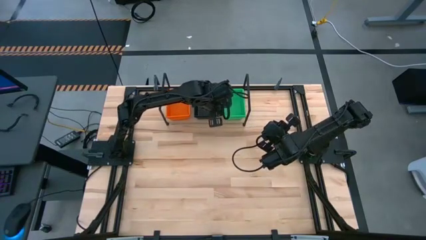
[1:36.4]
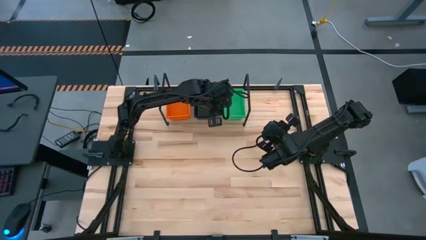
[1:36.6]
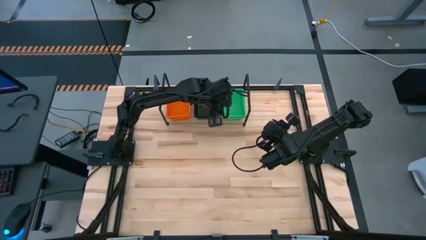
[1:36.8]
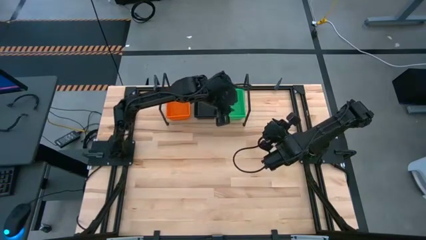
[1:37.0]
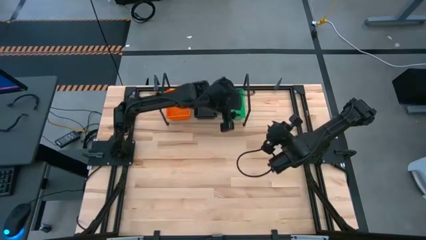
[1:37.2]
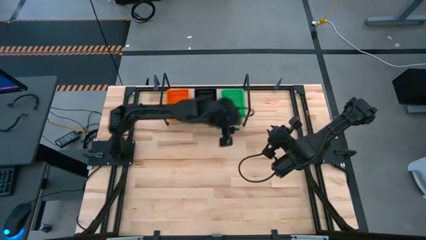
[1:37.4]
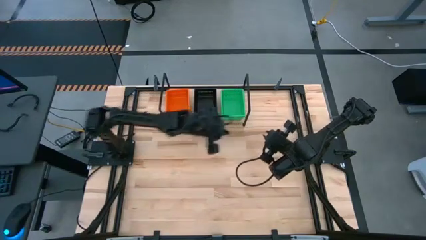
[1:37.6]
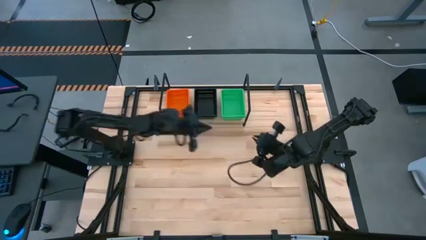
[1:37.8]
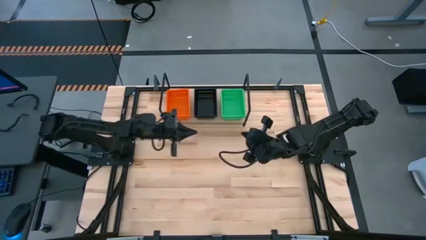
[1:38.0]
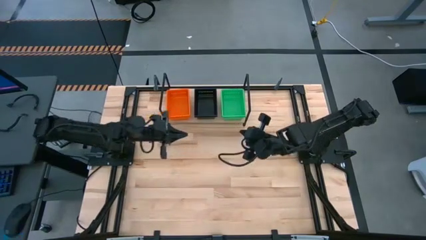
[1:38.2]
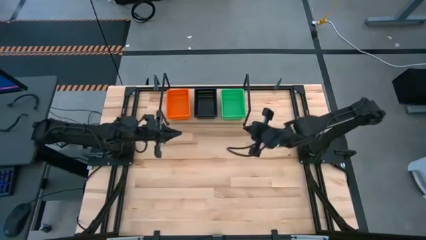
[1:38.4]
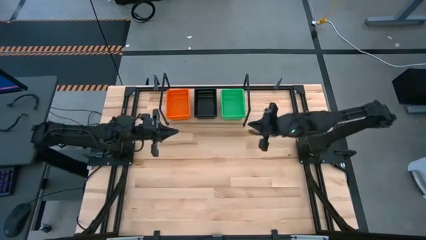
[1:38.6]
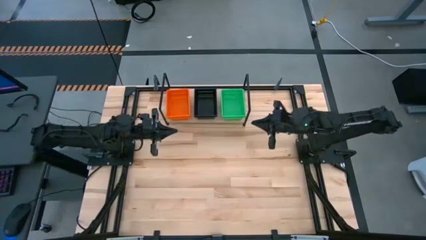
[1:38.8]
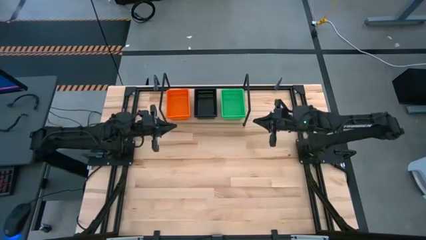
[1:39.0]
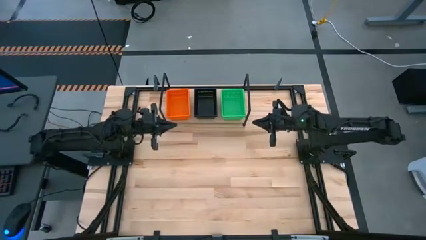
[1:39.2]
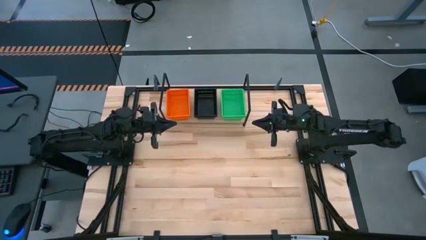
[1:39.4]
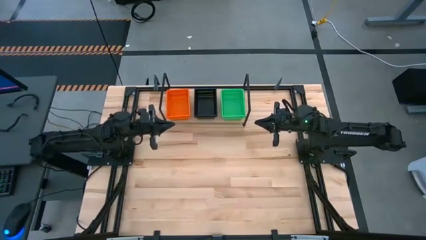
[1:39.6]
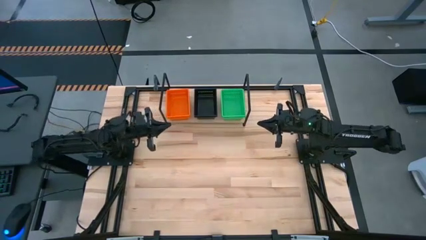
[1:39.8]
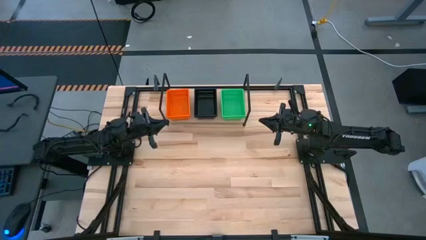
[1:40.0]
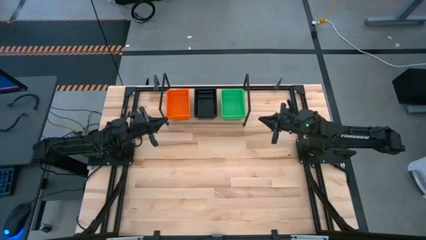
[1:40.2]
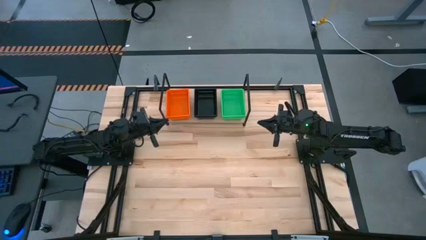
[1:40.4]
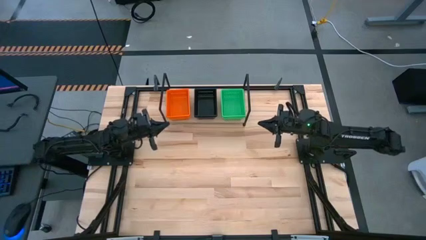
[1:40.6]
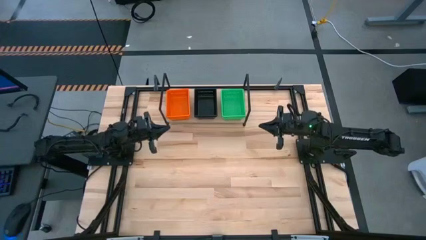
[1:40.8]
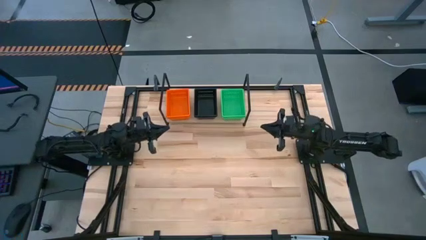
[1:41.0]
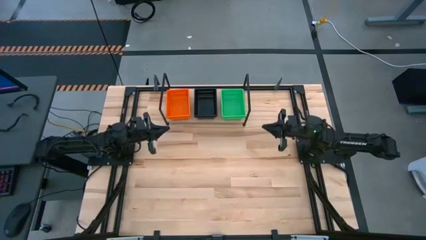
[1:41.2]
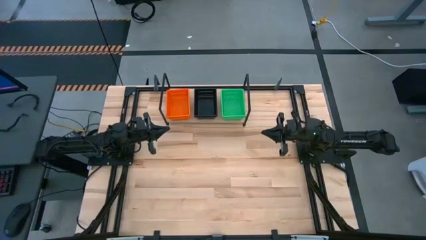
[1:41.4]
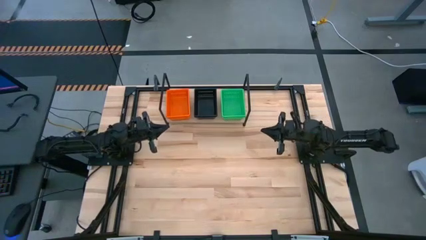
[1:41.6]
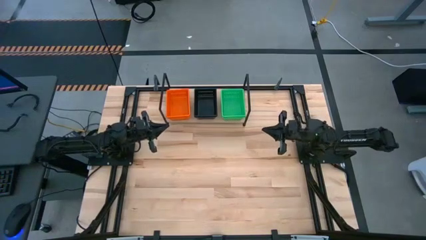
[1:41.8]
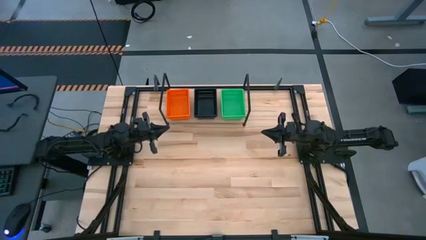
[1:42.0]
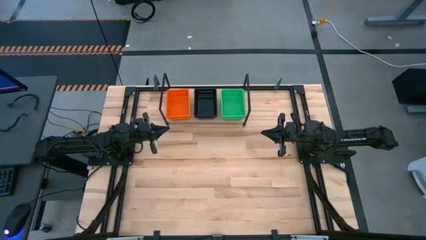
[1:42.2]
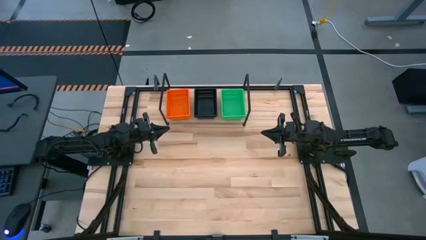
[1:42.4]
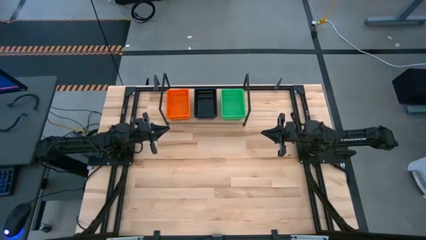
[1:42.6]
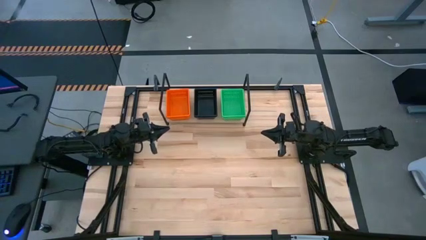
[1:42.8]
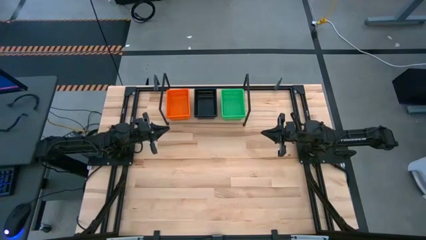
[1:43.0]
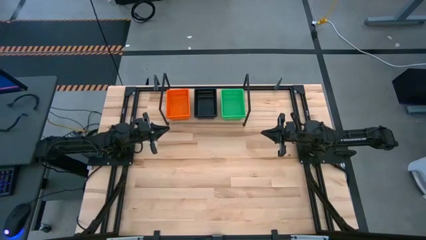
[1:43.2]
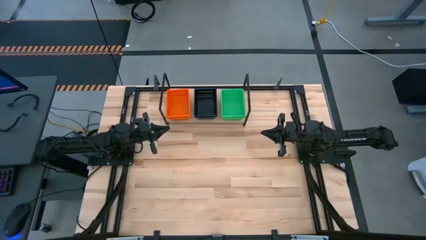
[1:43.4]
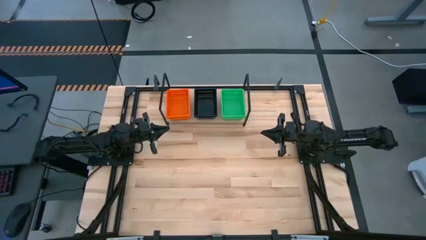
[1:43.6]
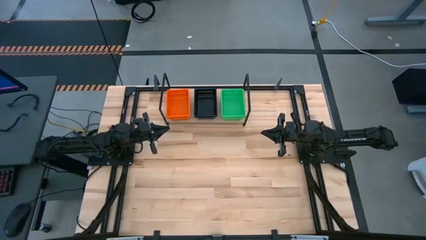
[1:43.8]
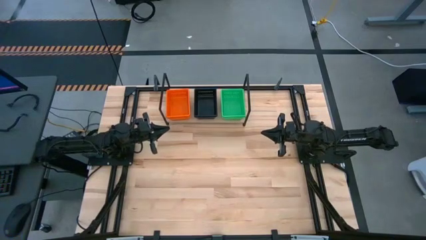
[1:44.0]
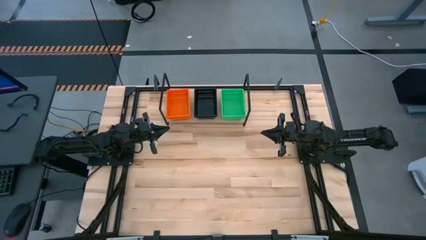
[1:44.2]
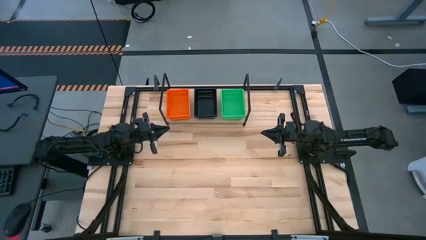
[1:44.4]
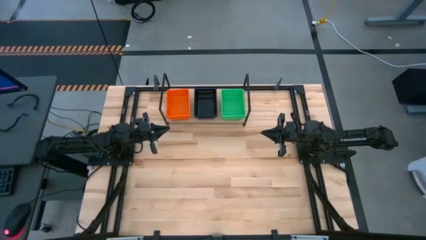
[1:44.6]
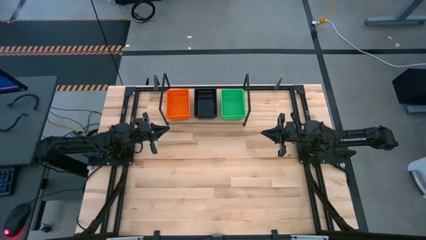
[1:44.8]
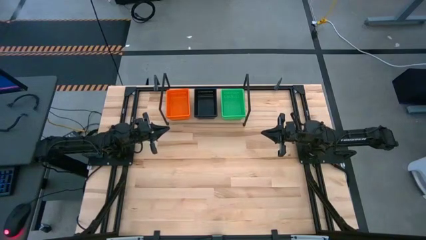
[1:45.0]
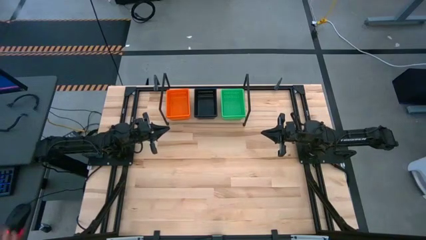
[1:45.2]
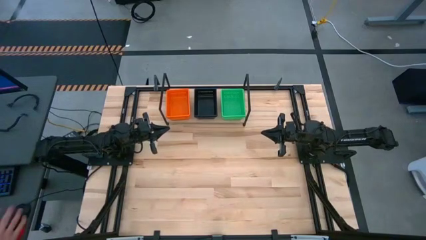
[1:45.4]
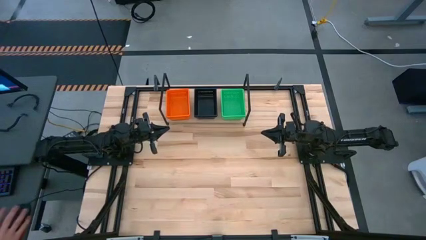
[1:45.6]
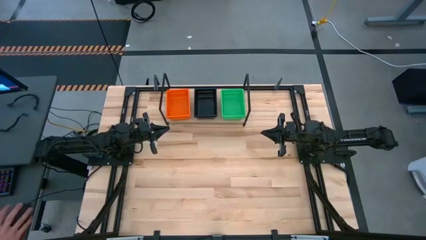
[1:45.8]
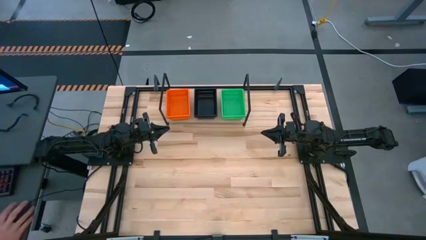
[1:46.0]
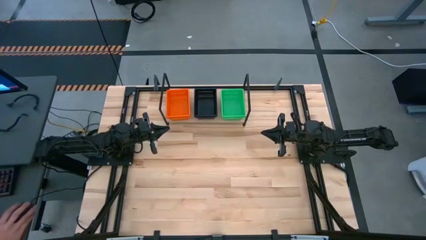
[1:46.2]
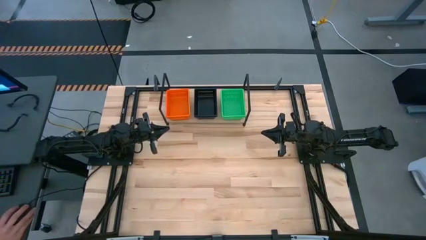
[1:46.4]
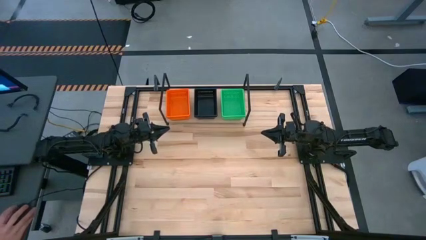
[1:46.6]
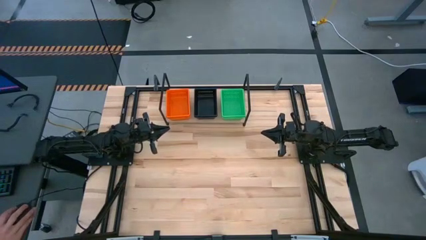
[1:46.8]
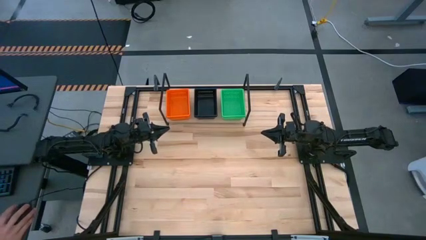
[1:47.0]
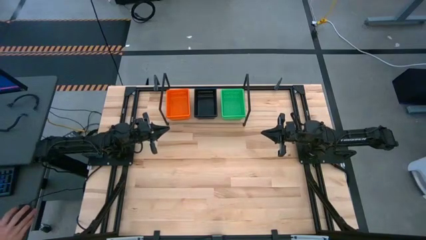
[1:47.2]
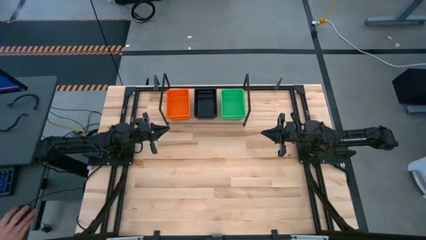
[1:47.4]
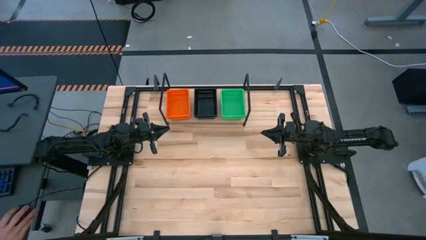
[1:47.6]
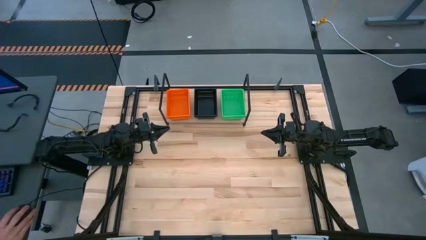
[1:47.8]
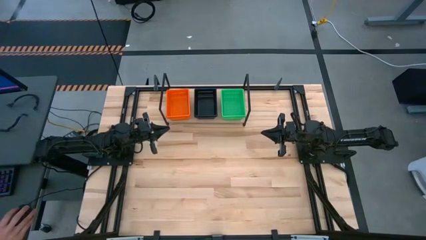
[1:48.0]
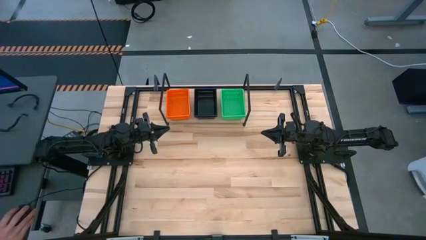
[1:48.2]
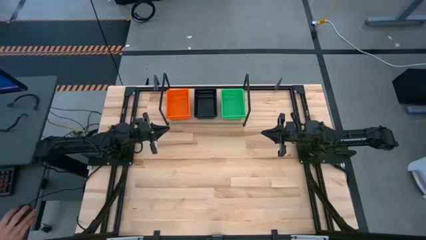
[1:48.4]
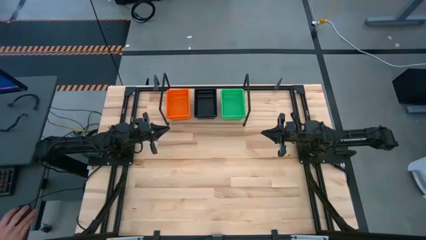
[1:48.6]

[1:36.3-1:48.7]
Task: Stack baskets on shelf by color
Return to Home Position
